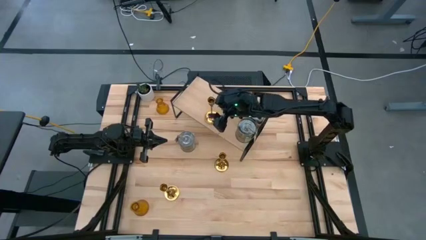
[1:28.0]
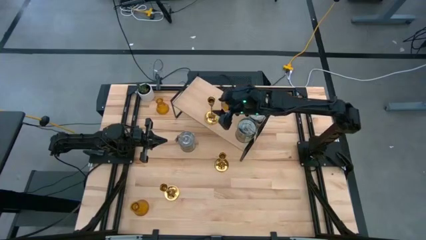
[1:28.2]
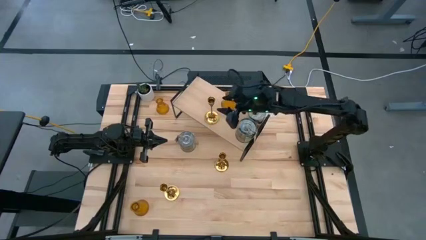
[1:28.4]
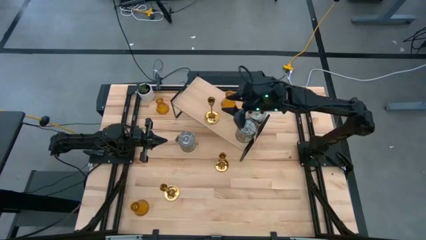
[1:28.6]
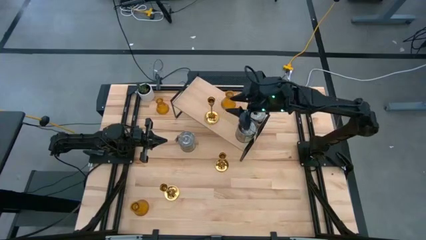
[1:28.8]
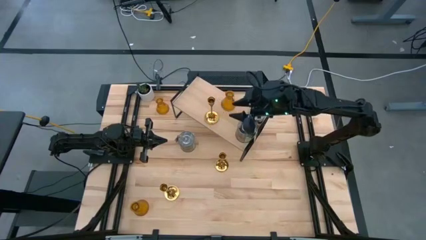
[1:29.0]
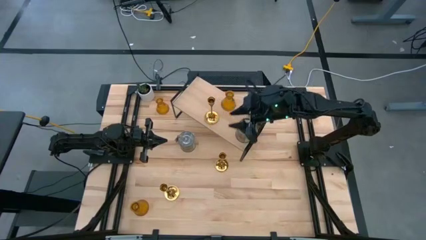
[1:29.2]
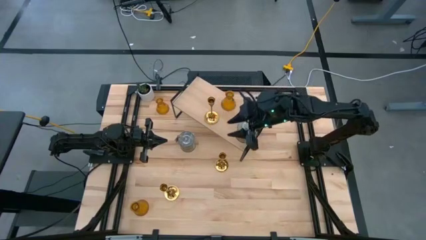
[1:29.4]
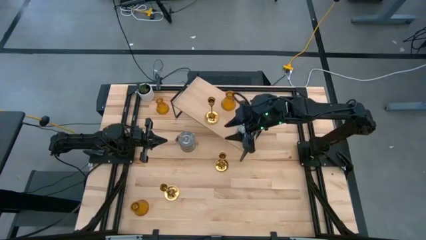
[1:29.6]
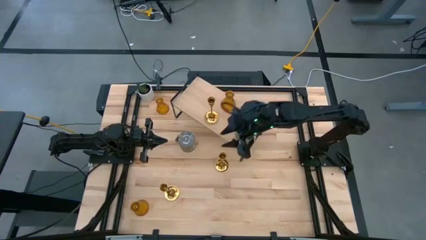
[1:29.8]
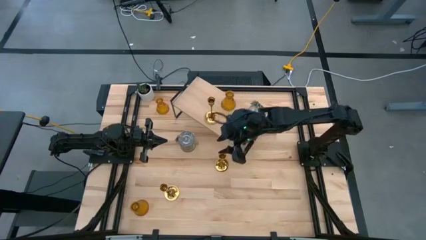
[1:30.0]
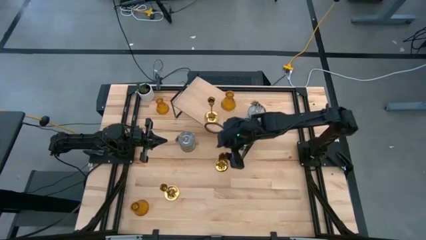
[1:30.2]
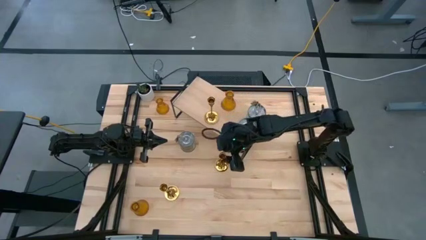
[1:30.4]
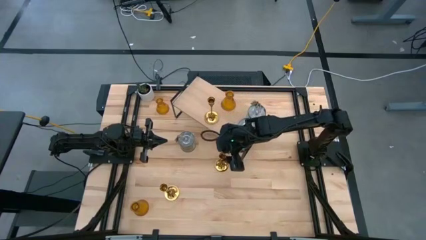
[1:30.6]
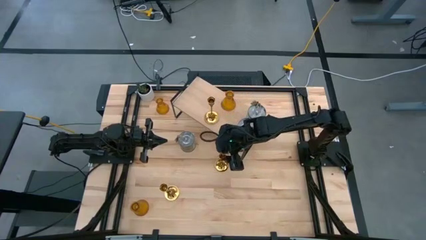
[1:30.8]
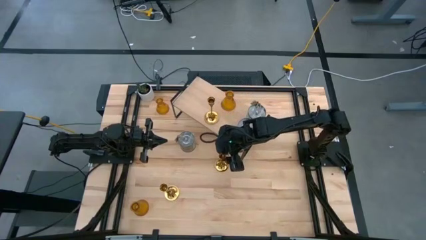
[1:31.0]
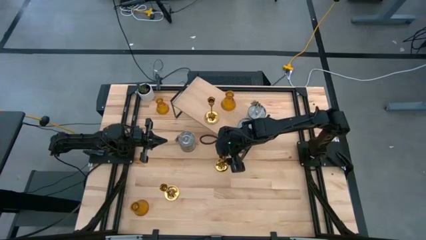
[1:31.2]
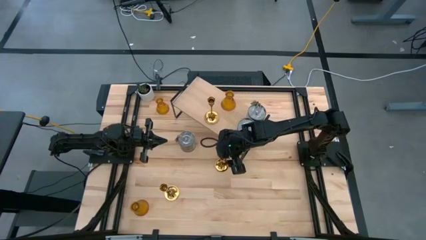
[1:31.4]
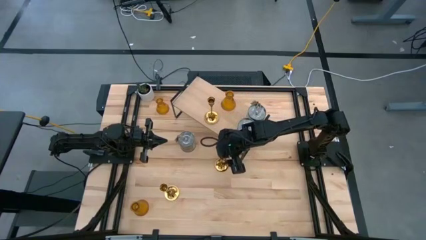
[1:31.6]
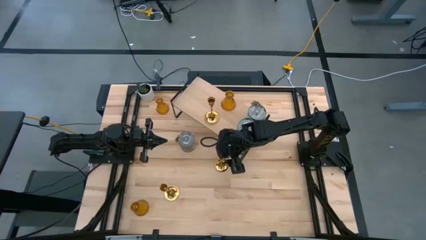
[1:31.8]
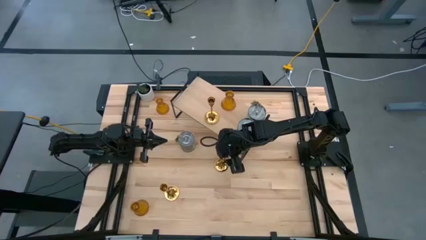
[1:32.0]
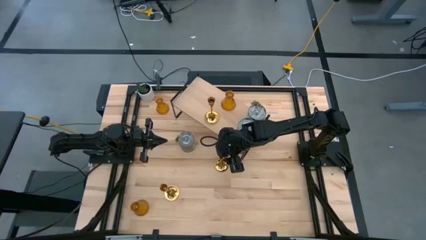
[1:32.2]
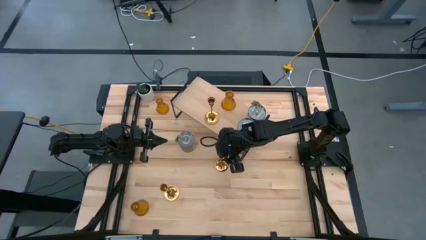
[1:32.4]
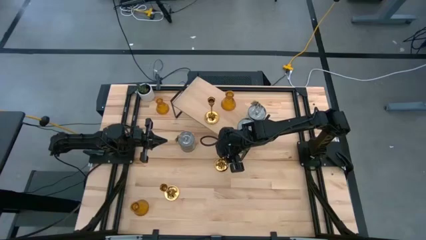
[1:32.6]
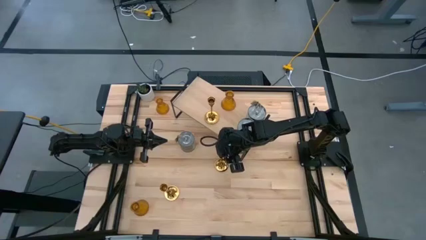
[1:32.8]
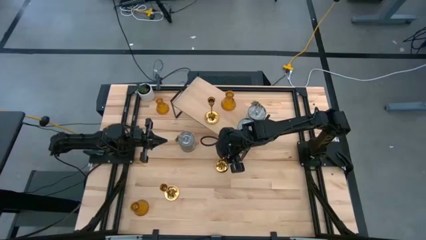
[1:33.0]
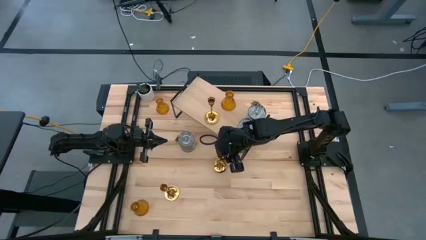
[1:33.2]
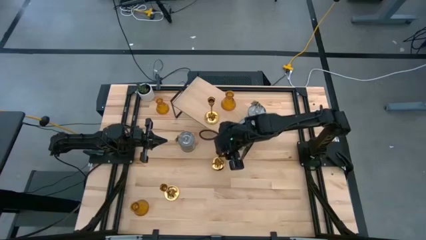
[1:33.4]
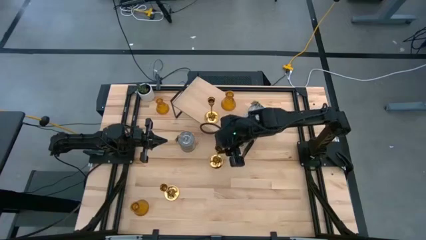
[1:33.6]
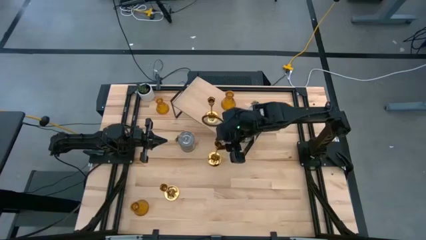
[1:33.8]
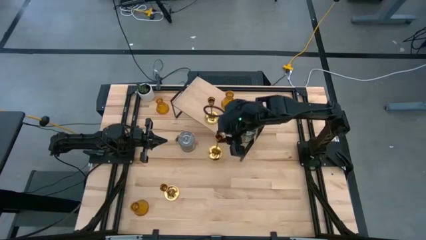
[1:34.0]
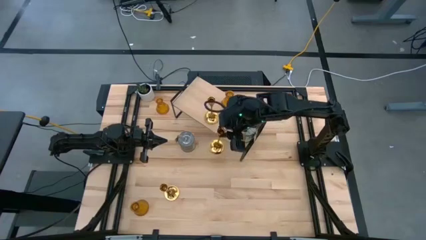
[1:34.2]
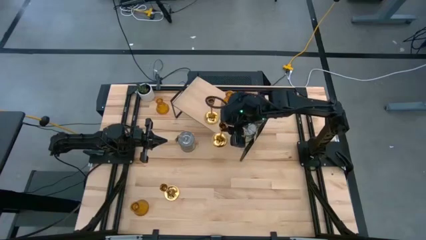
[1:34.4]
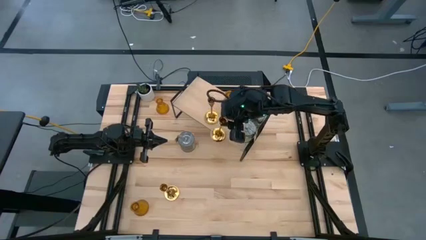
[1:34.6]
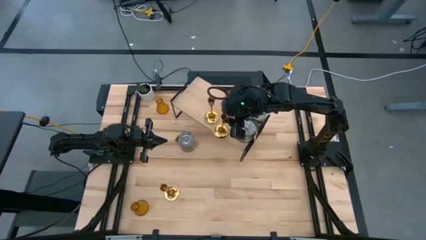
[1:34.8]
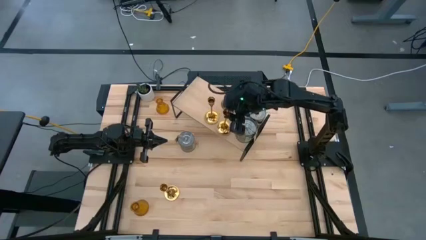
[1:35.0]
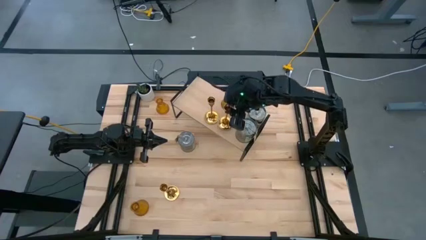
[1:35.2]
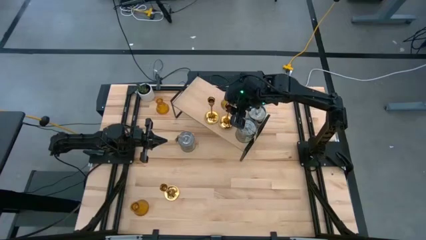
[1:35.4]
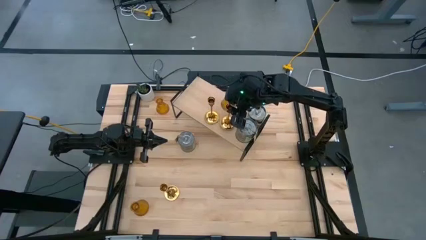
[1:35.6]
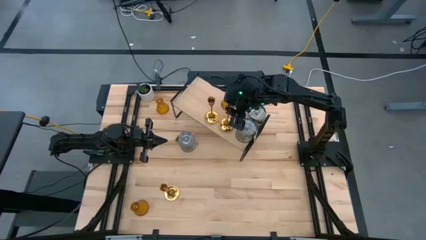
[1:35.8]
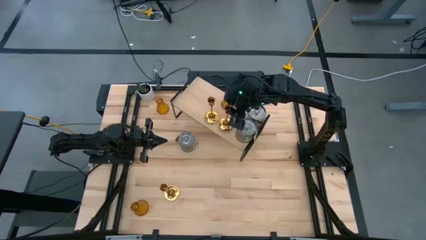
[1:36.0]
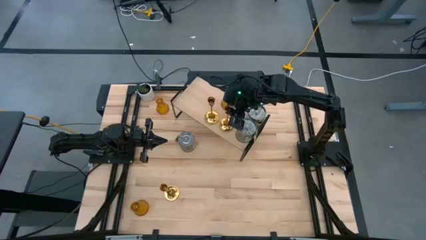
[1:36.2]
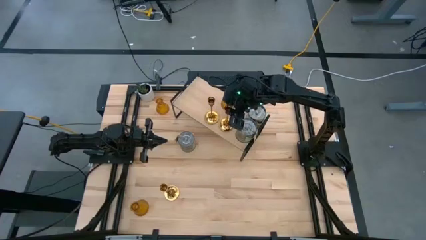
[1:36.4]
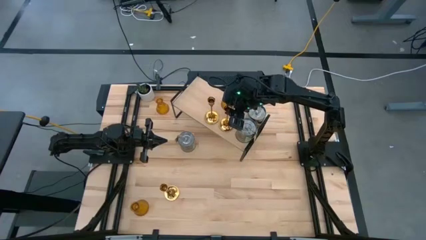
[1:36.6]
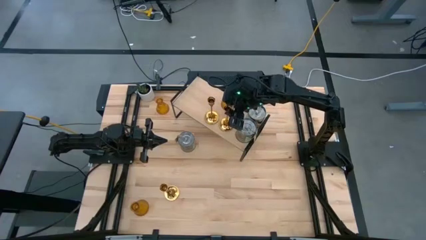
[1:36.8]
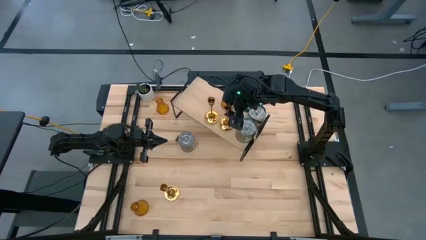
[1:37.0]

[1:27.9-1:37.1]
Task: Pick & Place candle stick holders
Put the top gold candle holder on the shelf

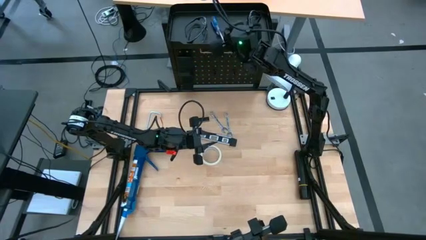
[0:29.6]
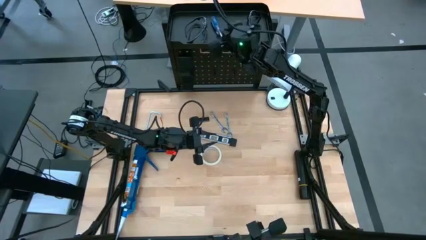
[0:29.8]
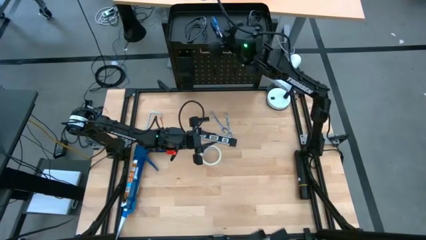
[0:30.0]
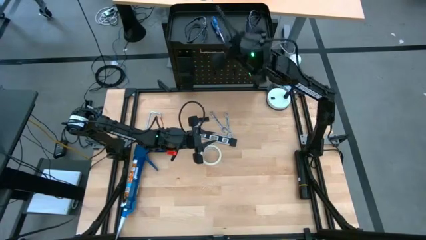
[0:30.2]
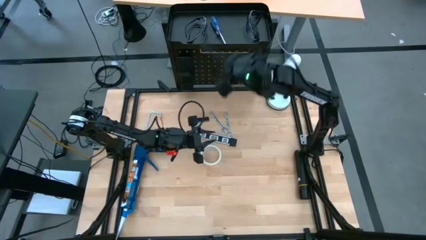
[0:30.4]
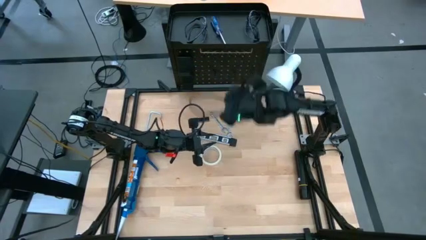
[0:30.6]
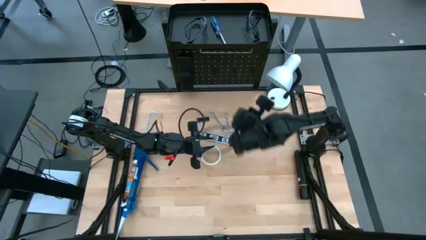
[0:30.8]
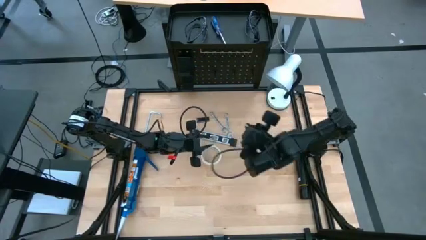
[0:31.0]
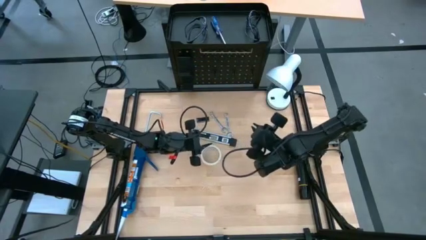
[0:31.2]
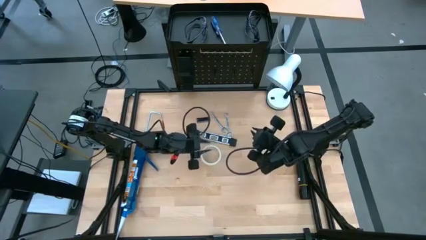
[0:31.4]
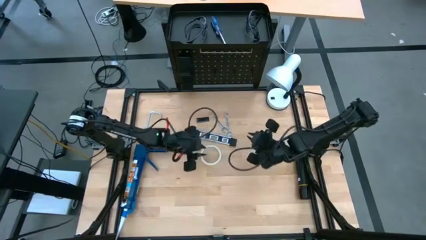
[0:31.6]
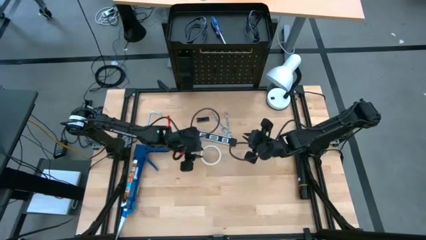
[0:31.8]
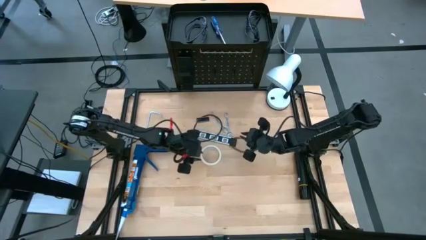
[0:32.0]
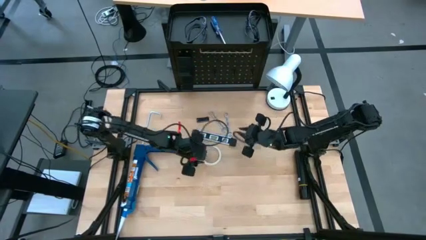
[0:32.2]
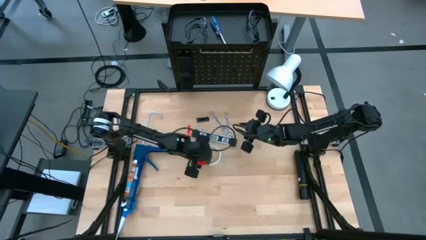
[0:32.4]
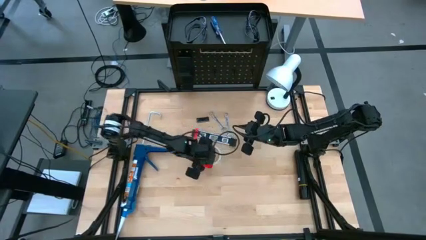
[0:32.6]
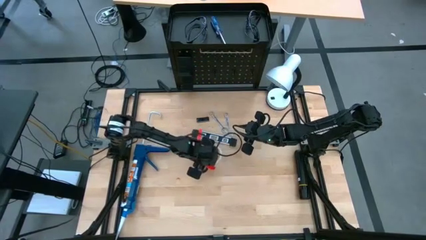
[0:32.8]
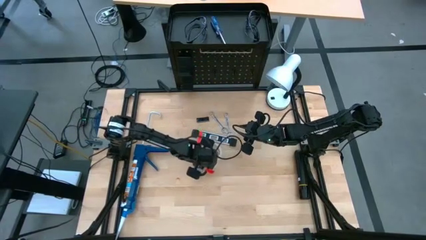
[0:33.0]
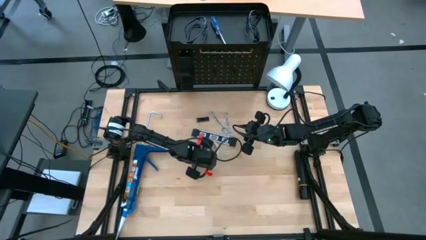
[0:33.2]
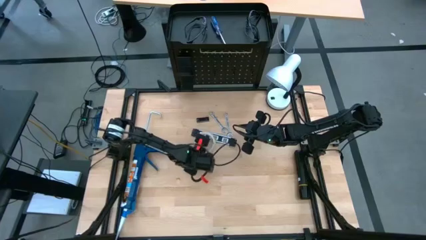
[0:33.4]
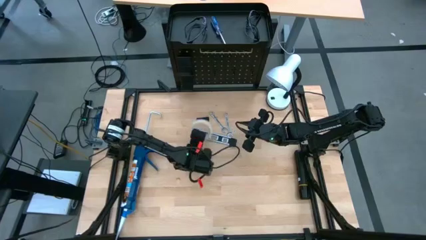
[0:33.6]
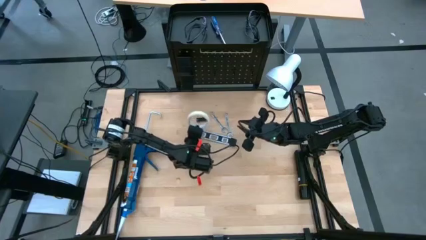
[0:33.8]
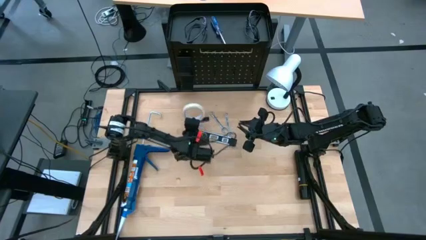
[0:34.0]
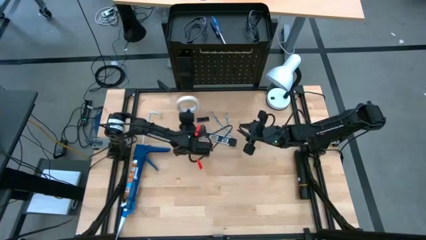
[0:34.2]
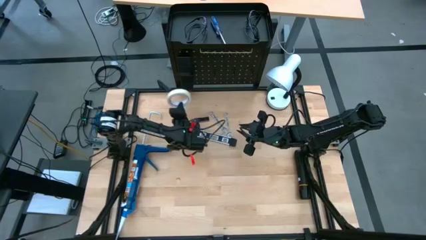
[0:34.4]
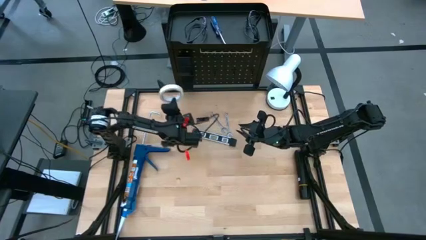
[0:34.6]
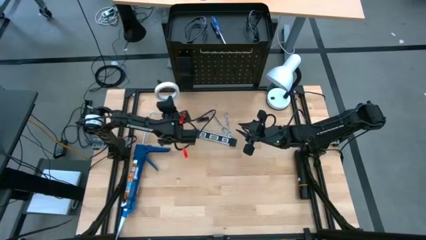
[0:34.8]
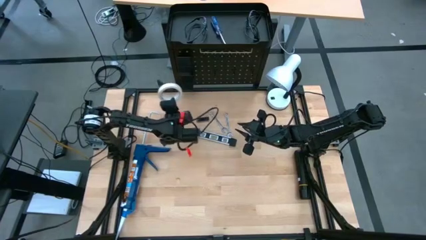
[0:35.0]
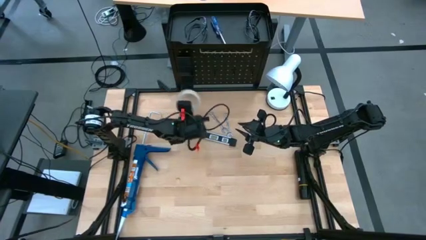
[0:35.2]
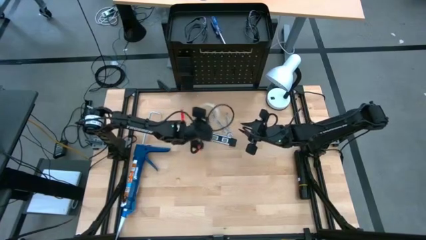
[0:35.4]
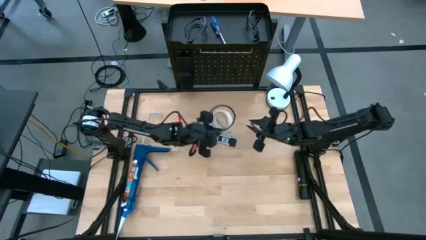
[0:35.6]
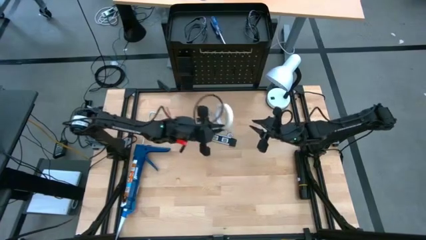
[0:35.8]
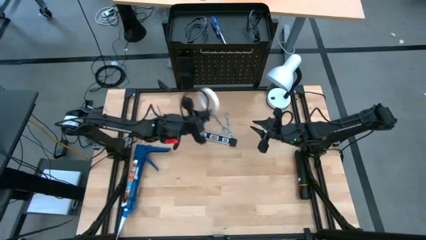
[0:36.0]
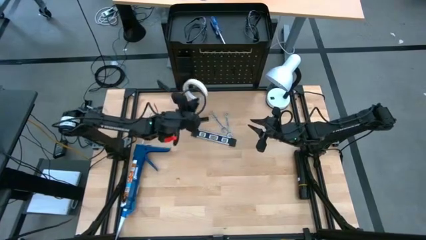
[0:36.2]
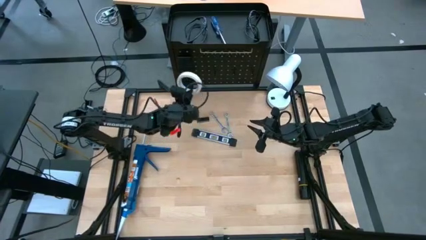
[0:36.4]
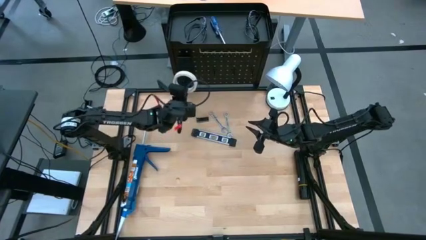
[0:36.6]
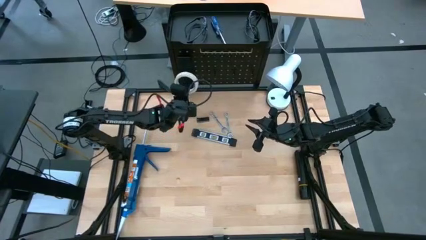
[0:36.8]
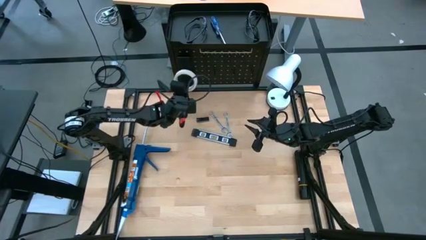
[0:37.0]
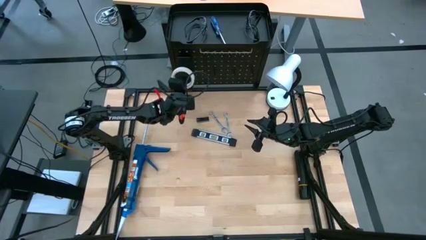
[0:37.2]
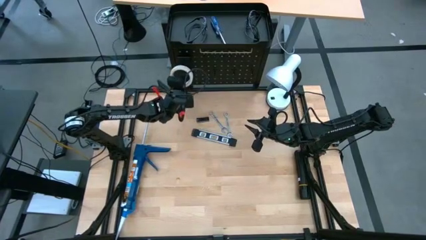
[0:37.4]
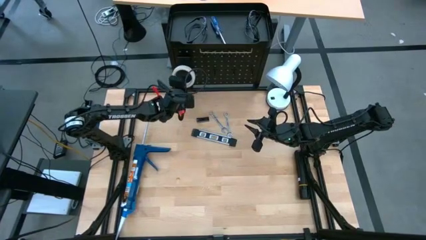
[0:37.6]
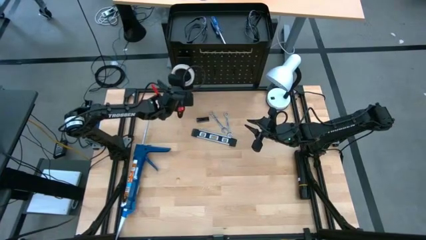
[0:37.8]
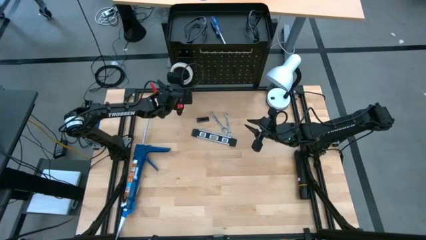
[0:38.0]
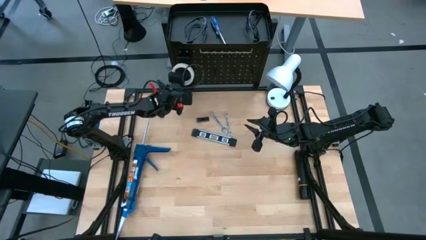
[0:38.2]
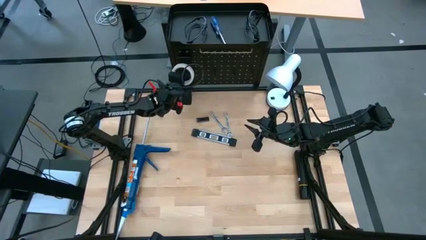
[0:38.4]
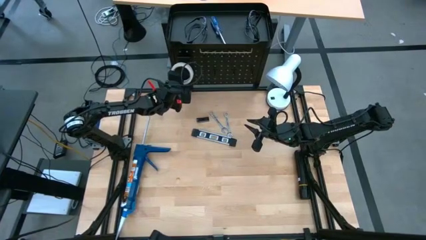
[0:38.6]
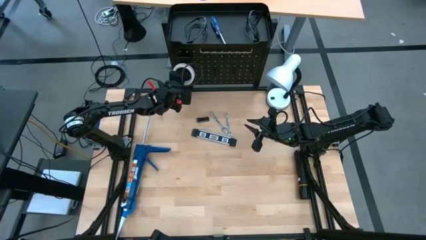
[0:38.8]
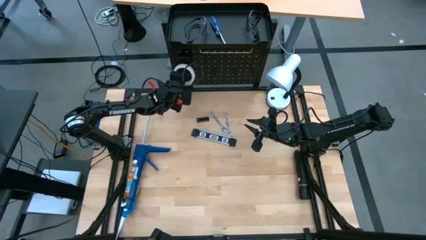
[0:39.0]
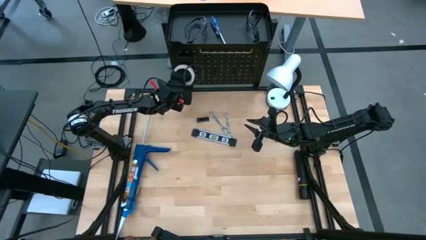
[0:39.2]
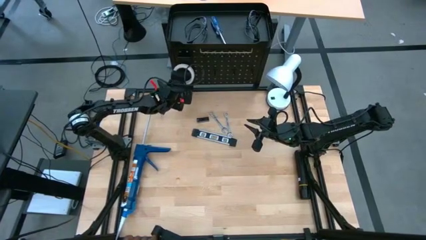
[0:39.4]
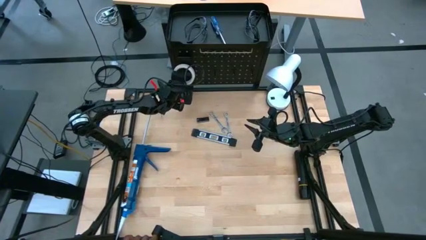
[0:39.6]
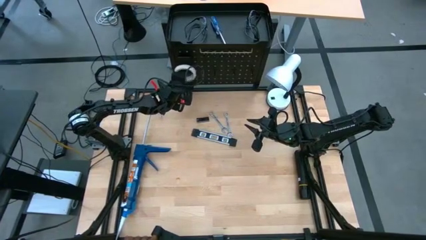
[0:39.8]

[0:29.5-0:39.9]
Task: Hang tools onto peg board
Hang the masking tape on the pegboard
